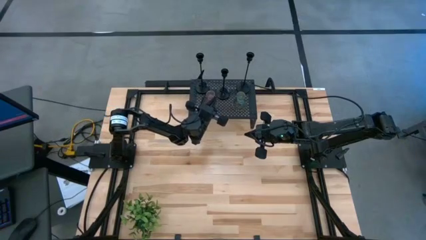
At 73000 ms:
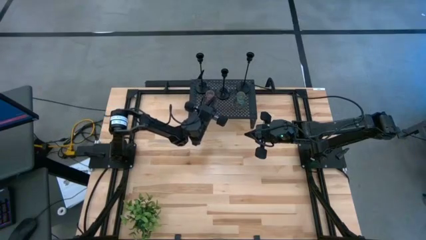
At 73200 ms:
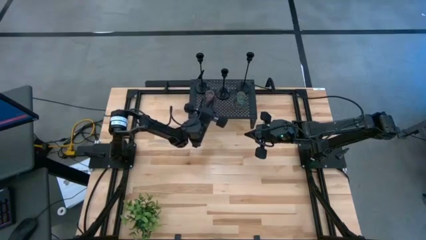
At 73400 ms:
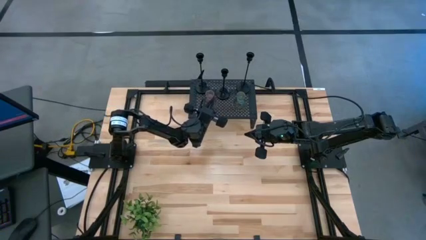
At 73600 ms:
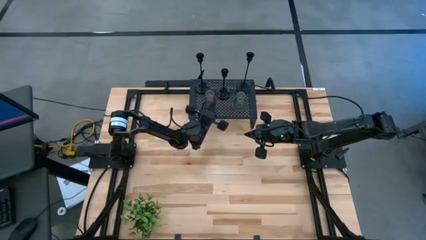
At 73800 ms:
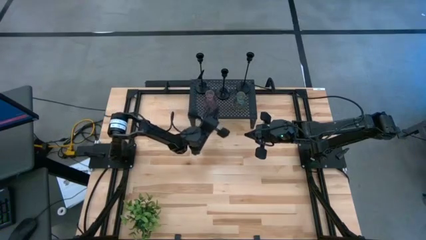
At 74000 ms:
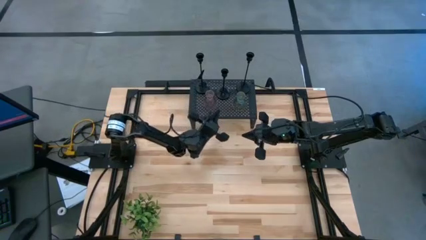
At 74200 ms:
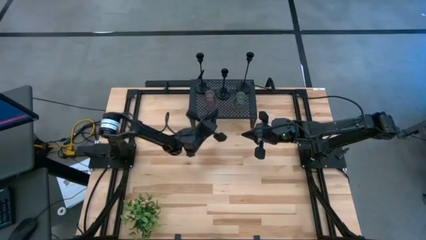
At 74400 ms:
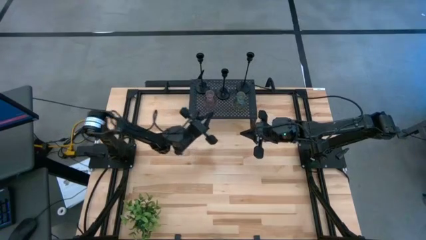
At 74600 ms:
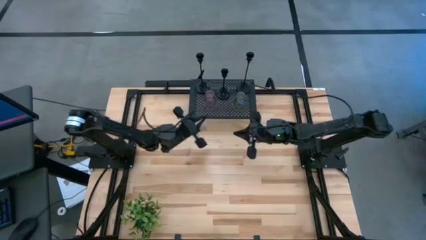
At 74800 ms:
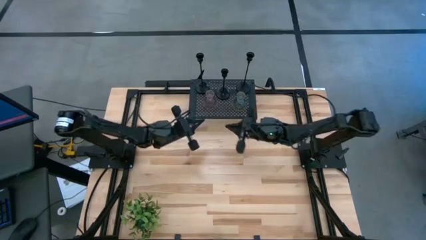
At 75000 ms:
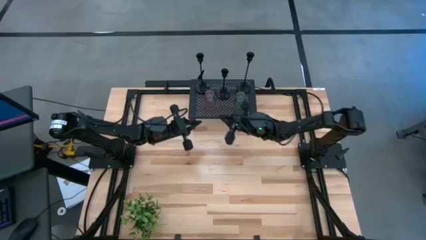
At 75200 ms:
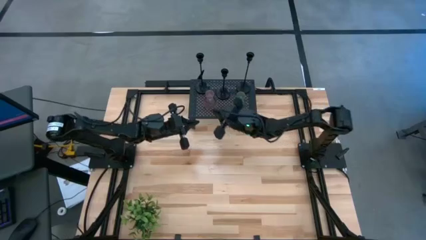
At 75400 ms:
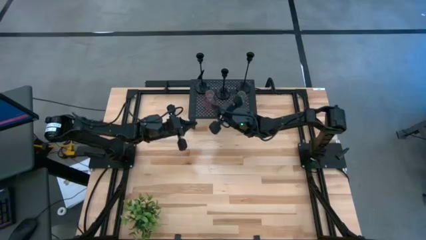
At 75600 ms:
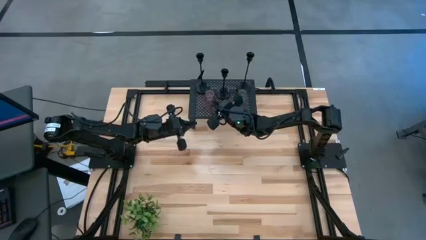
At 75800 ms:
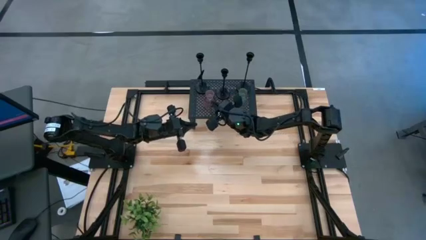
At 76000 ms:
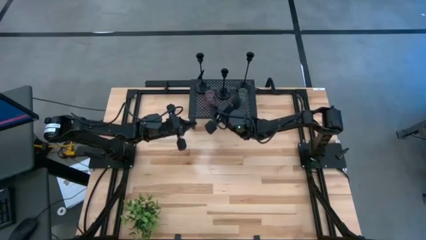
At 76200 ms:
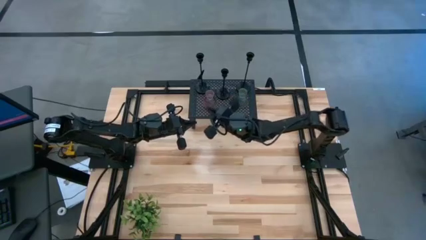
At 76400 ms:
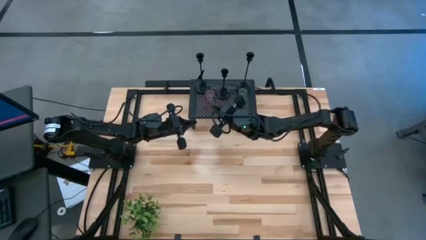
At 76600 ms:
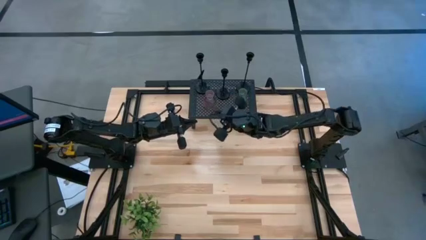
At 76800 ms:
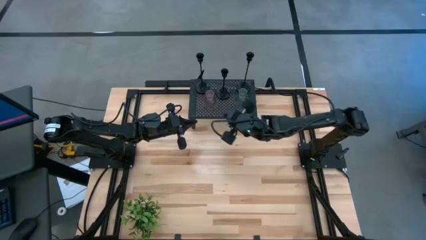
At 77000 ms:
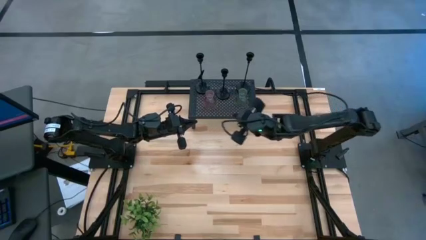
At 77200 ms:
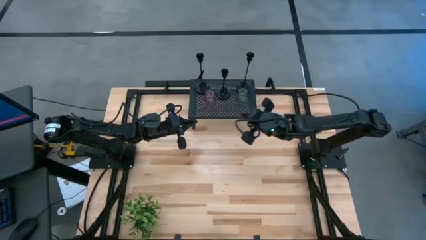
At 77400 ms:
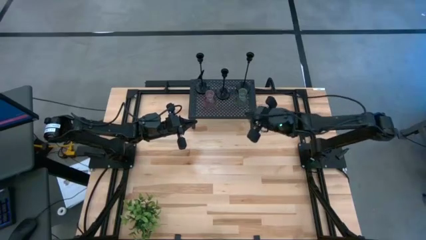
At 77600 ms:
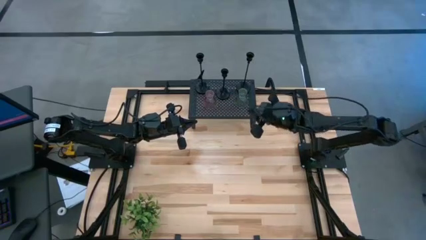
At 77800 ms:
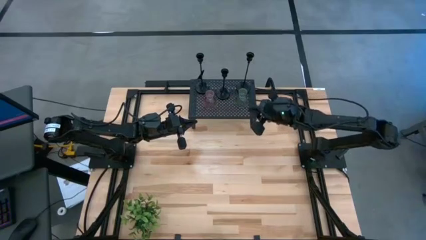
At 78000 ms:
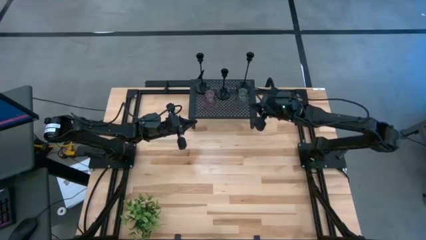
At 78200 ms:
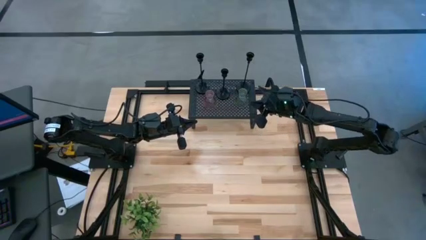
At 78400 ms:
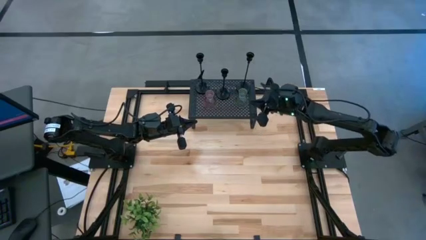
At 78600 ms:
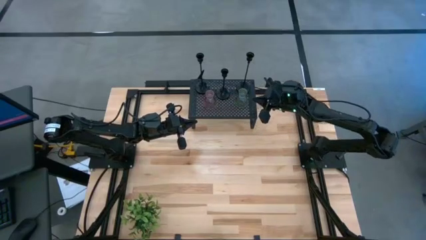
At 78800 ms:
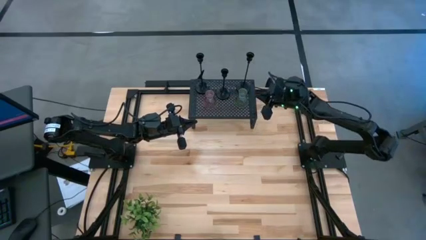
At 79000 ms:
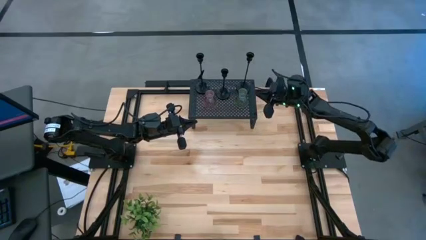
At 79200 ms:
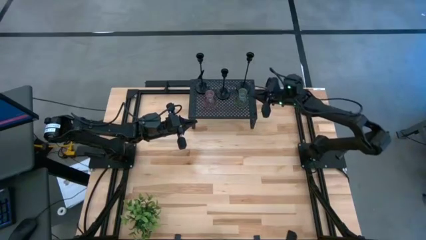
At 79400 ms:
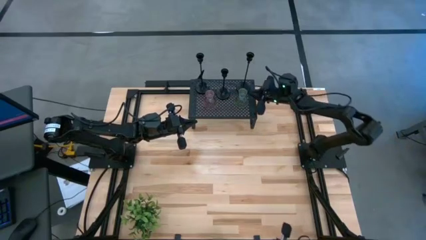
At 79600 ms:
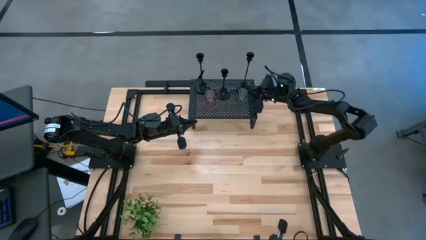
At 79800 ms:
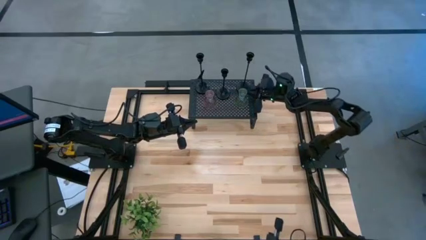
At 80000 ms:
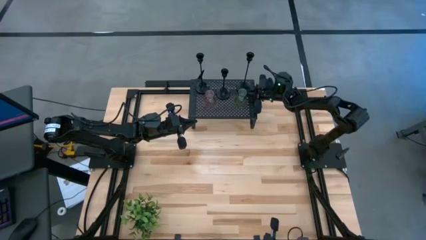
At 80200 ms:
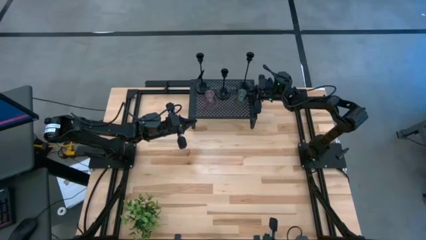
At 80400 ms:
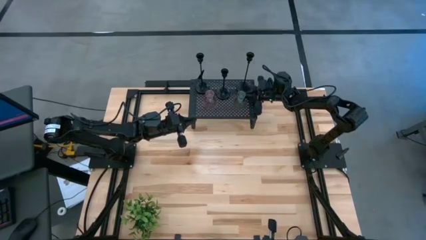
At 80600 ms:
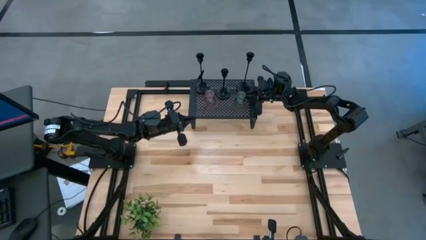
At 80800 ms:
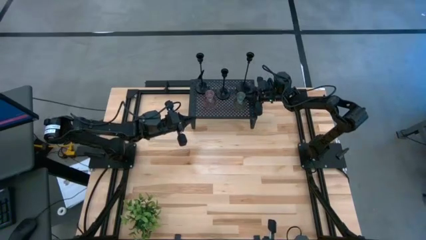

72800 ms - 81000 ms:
Task: Pick & Place candle stick holders
Adjust the green candle holder on the shelf

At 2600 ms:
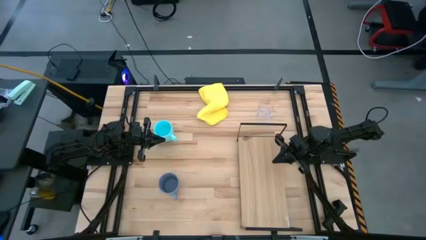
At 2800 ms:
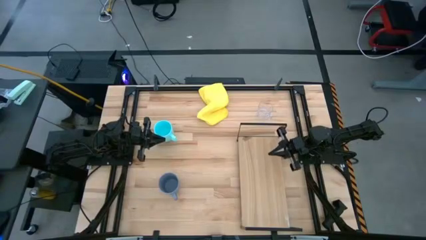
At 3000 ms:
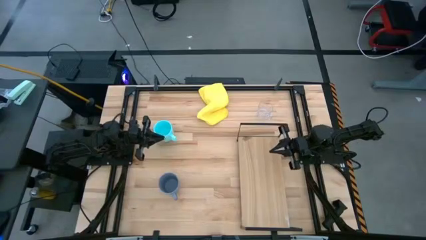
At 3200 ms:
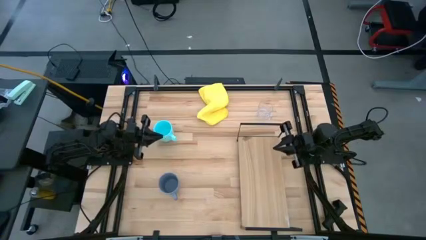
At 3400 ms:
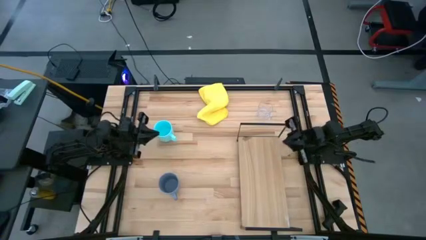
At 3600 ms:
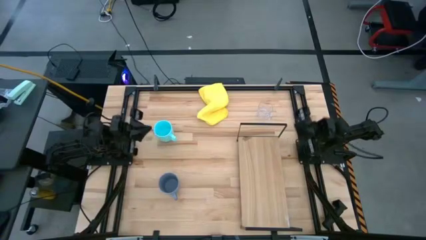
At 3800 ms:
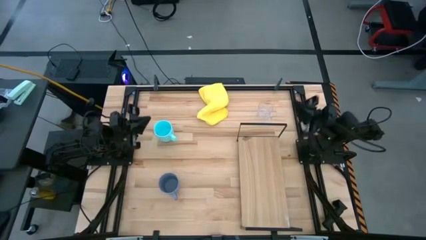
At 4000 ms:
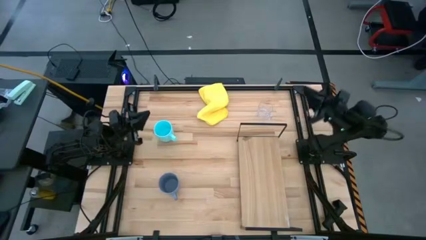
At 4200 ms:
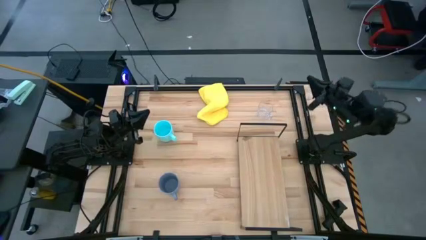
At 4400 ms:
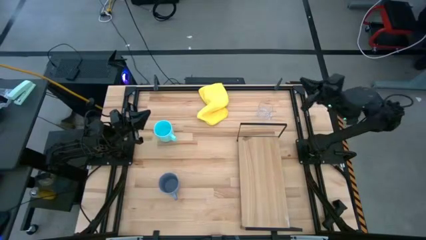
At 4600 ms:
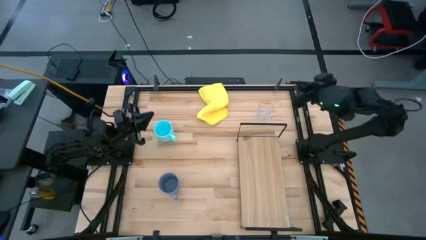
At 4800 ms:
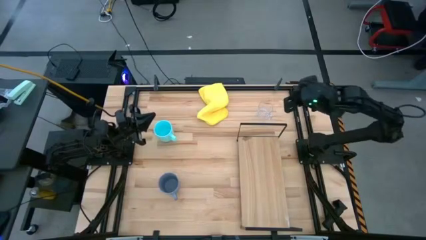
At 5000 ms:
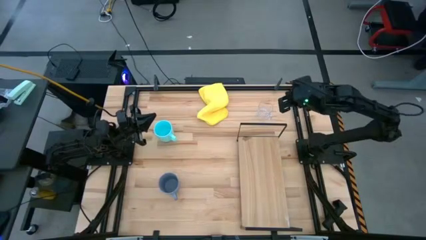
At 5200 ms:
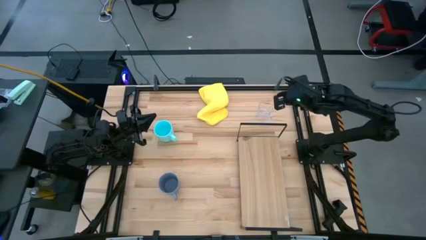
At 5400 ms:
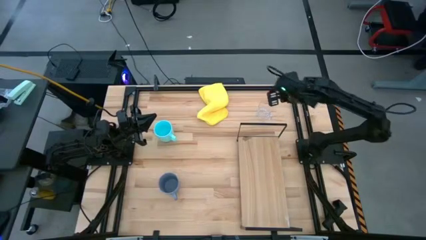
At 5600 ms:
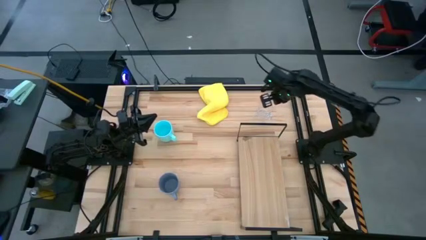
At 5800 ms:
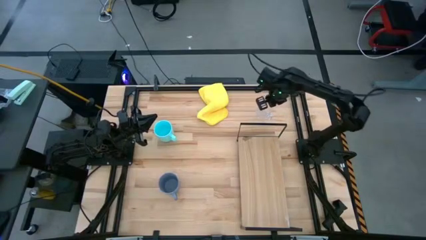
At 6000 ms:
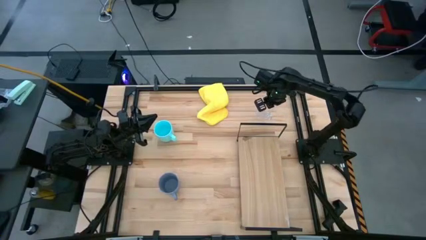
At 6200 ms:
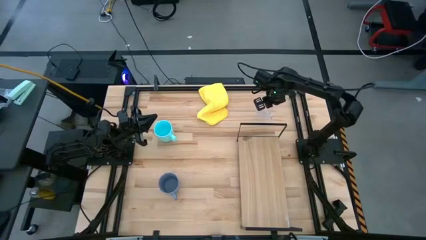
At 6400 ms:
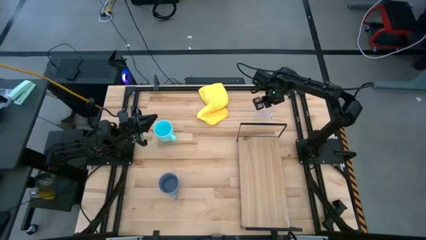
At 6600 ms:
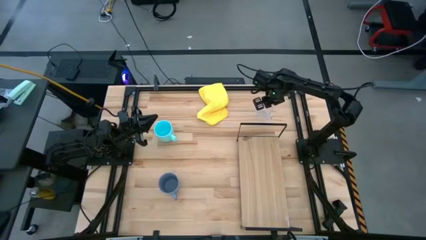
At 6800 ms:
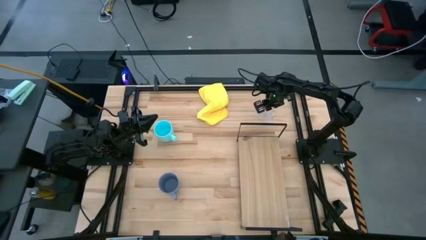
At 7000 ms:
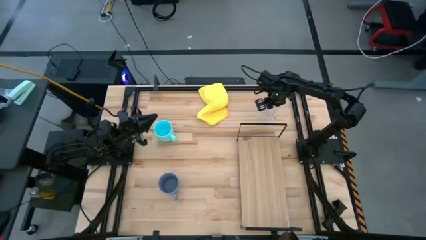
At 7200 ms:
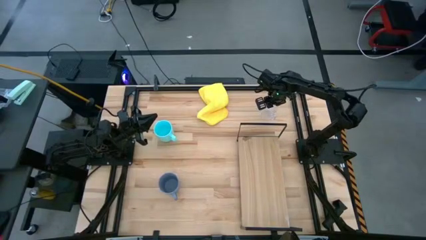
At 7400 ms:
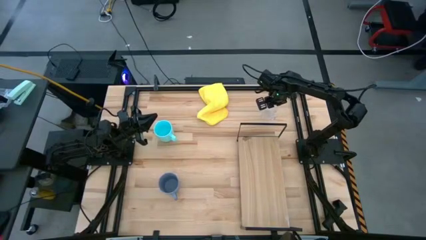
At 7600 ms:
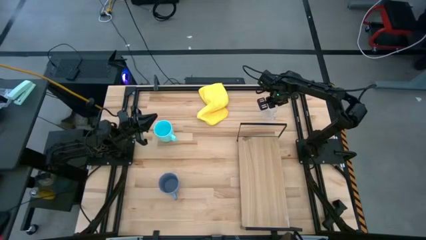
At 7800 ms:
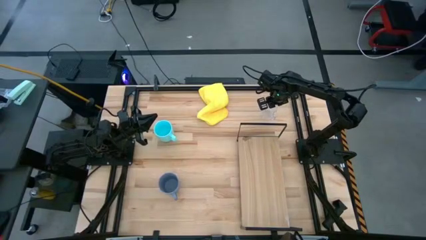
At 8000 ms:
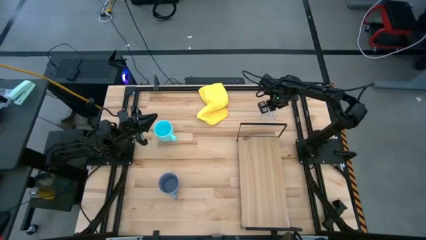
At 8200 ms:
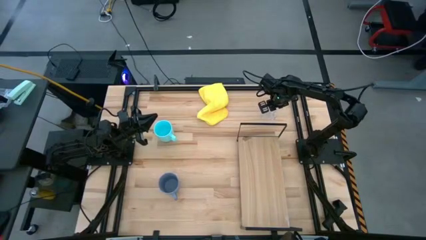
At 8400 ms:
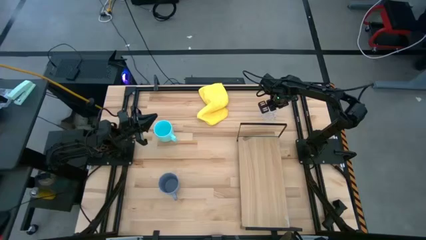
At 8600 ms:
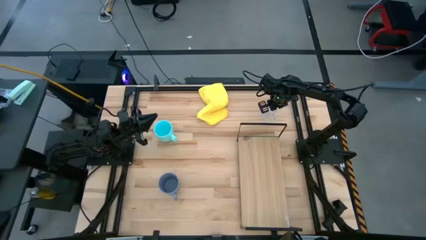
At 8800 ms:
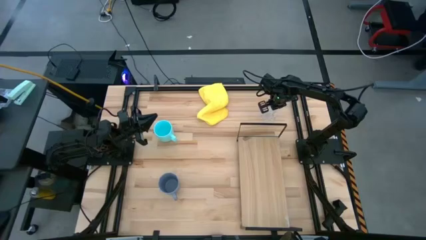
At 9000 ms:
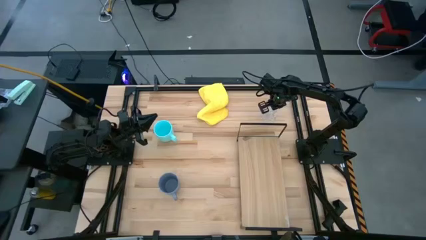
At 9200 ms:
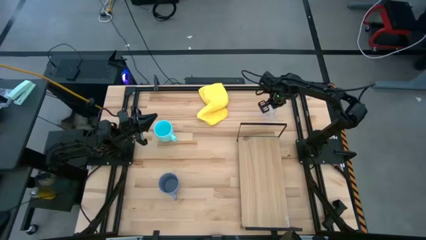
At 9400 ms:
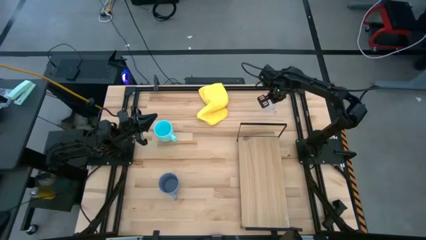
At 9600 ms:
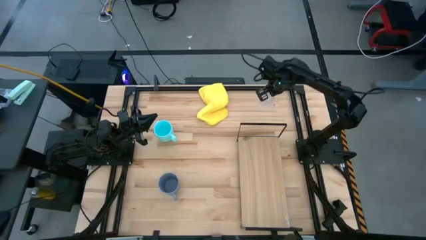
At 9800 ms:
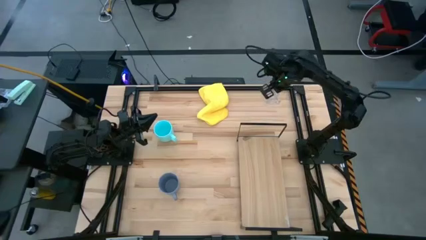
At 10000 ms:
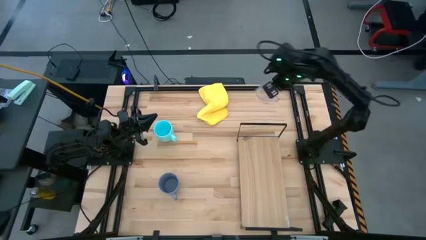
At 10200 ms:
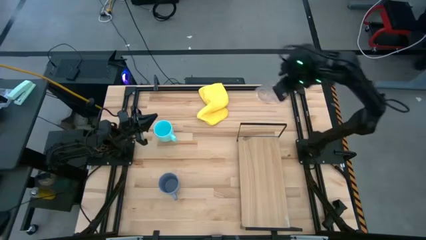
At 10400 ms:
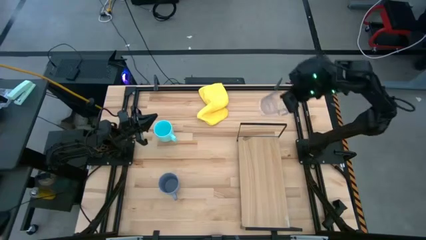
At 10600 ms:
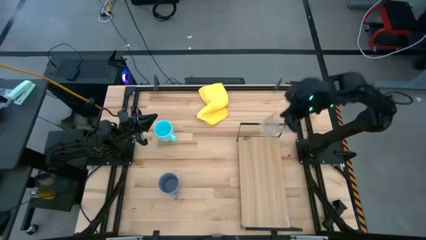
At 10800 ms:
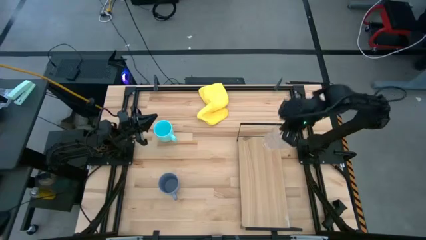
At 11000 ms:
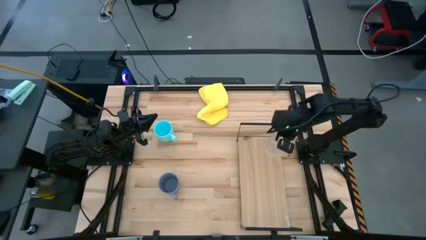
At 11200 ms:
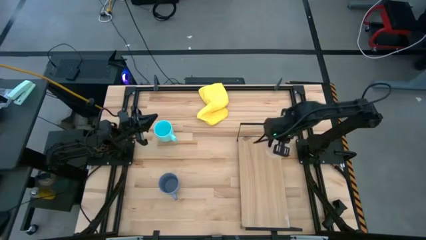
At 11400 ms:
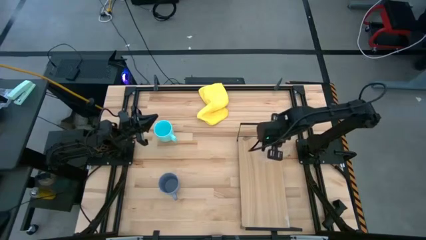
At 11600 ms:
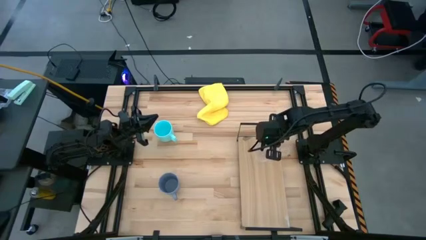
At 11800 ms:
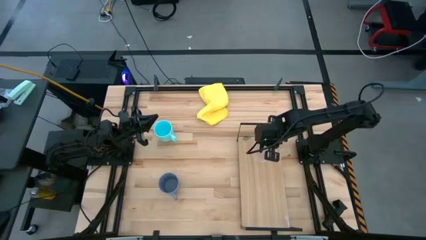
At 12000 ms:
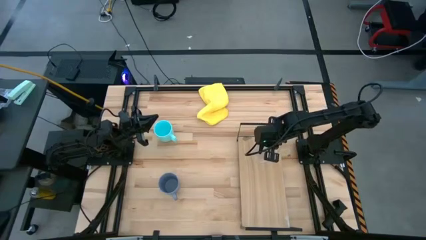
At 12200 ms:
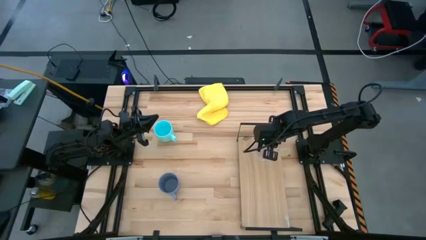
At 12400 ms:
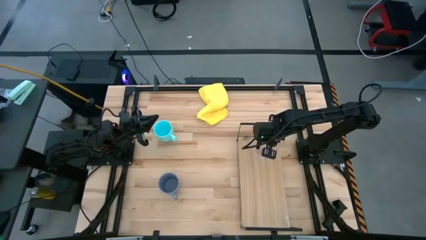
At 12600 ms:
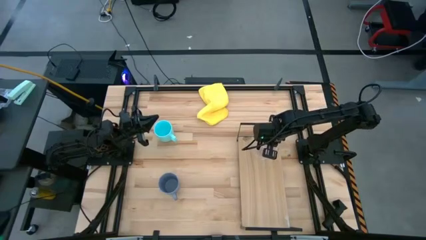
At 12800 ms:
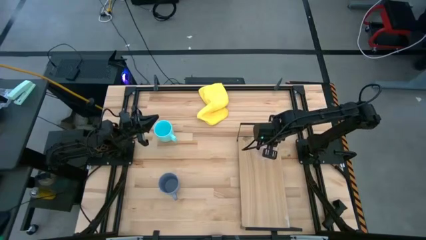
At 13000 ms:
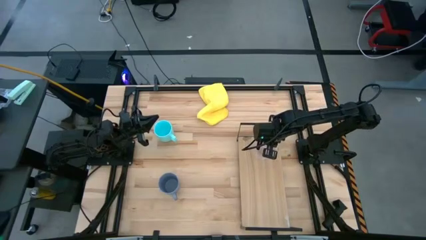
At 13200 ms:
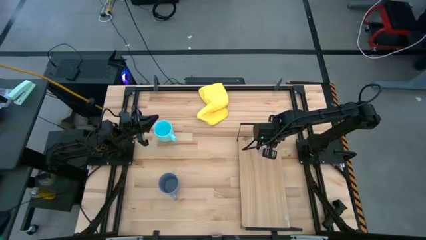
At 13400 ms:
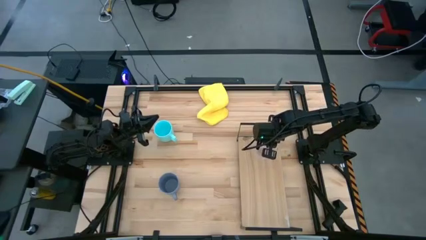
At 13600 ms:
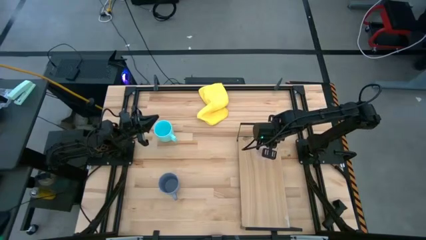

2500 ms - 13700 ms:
Task: Stack small to large cups/mugs on shelf
Put the transparent mug on the shelf
